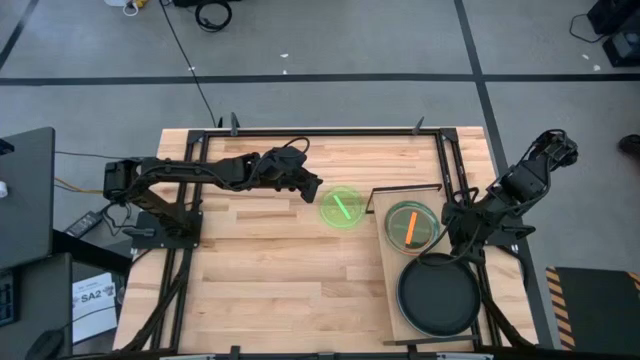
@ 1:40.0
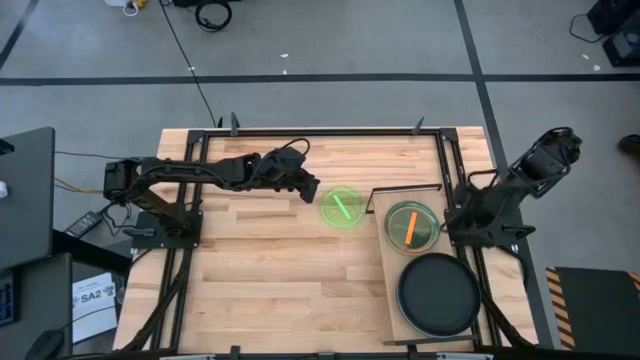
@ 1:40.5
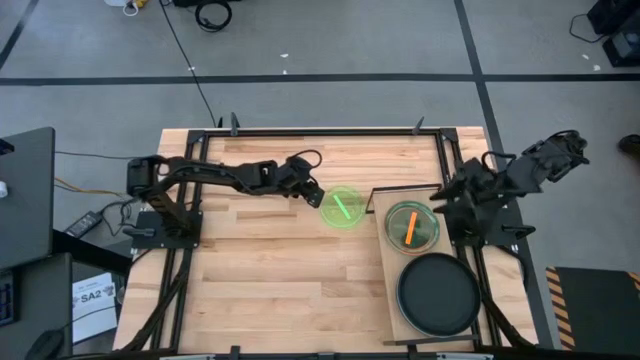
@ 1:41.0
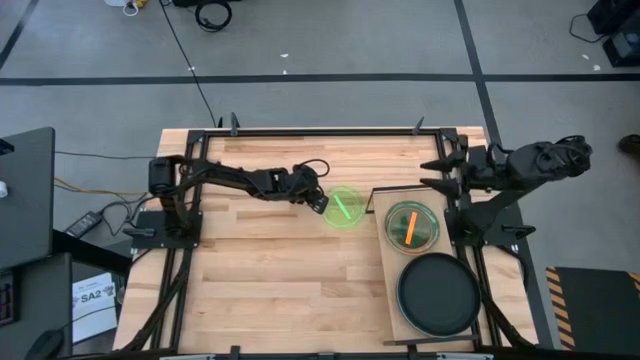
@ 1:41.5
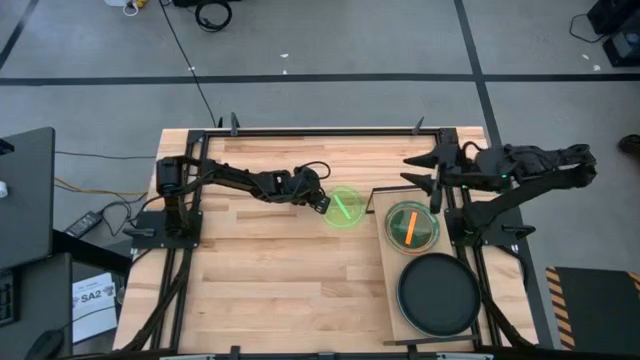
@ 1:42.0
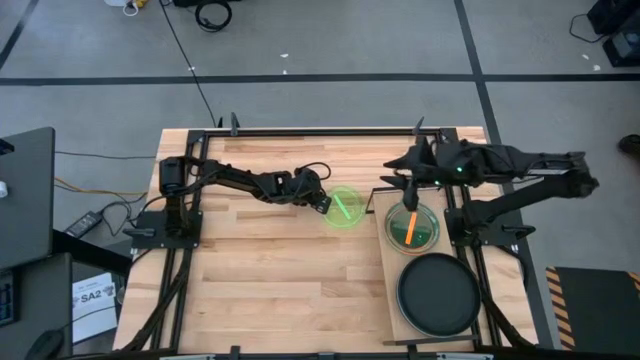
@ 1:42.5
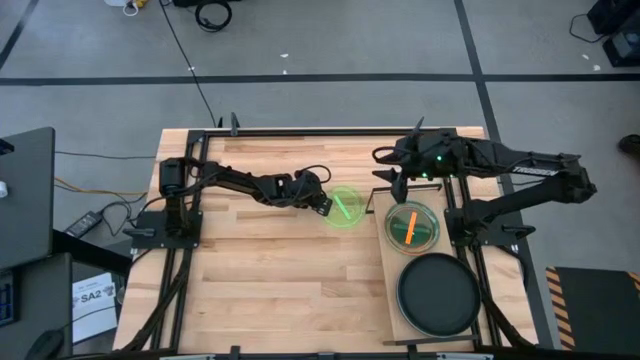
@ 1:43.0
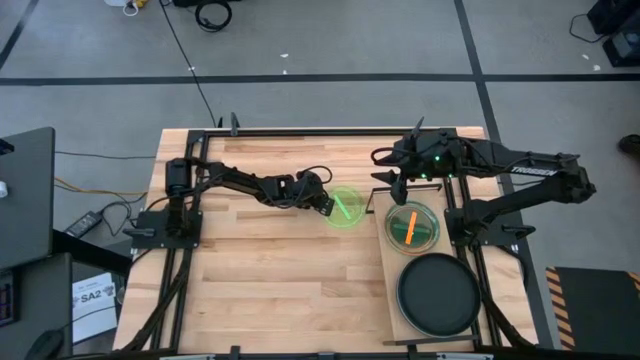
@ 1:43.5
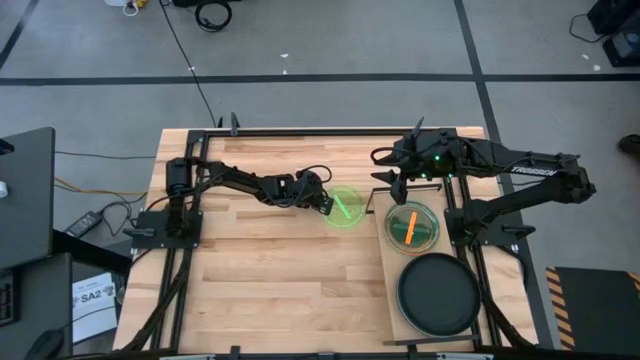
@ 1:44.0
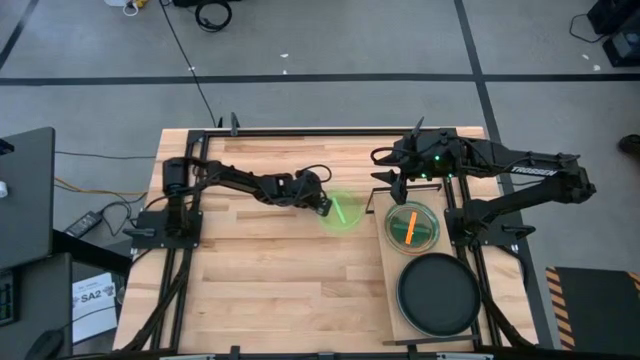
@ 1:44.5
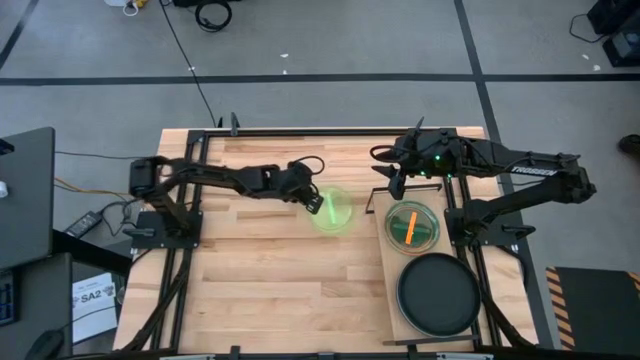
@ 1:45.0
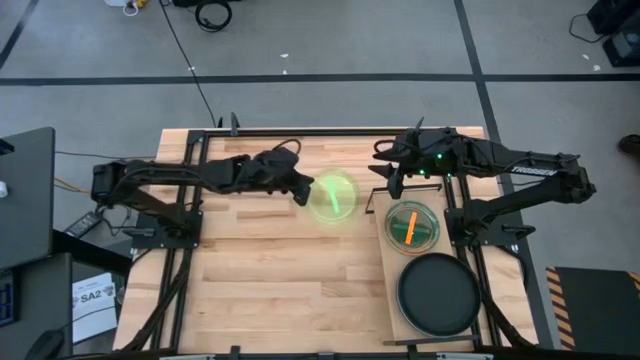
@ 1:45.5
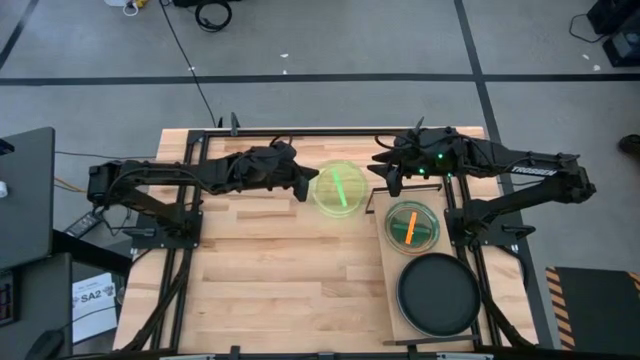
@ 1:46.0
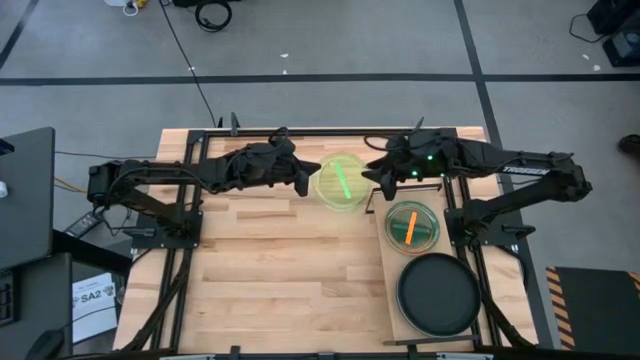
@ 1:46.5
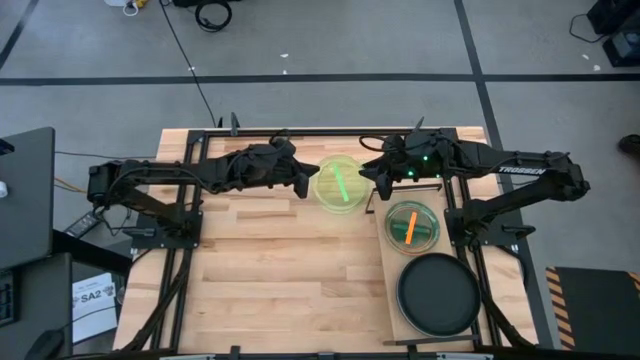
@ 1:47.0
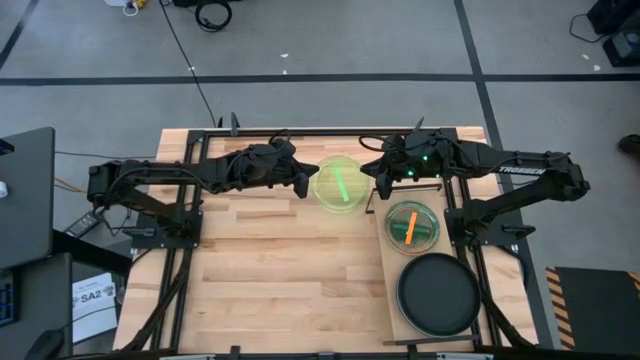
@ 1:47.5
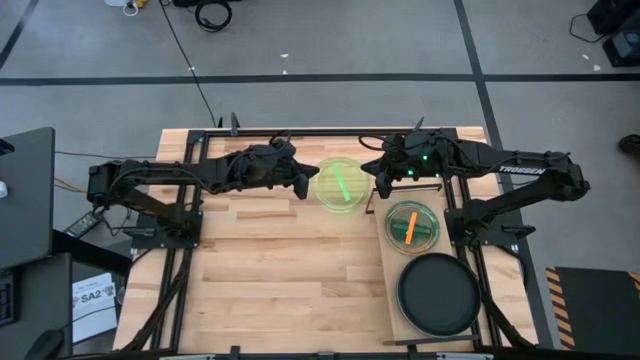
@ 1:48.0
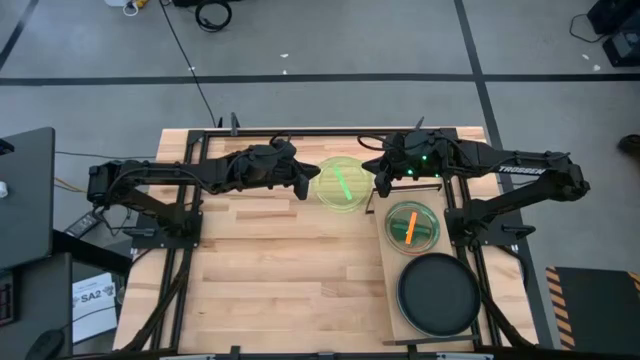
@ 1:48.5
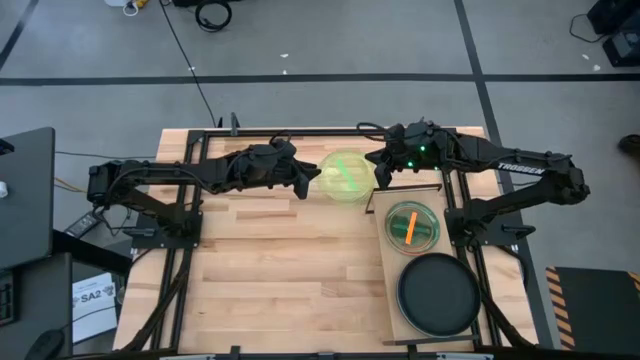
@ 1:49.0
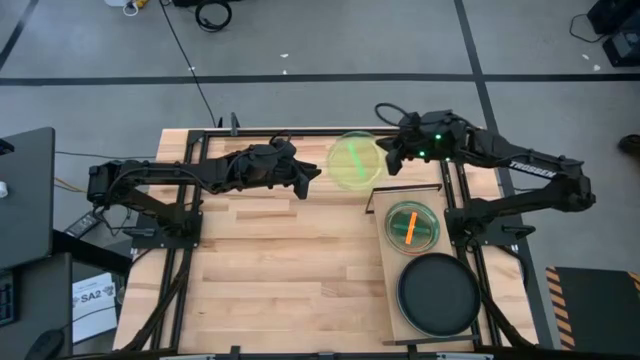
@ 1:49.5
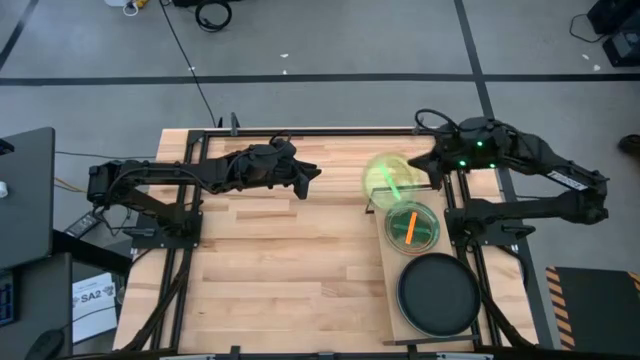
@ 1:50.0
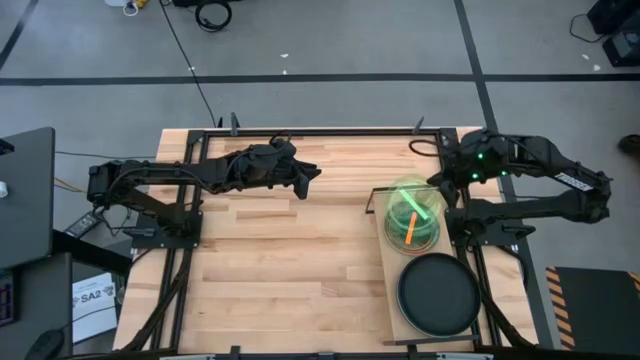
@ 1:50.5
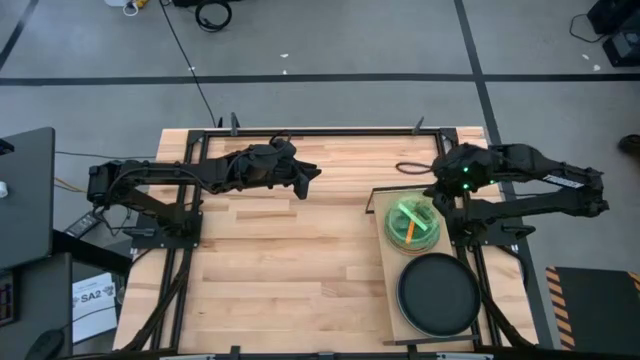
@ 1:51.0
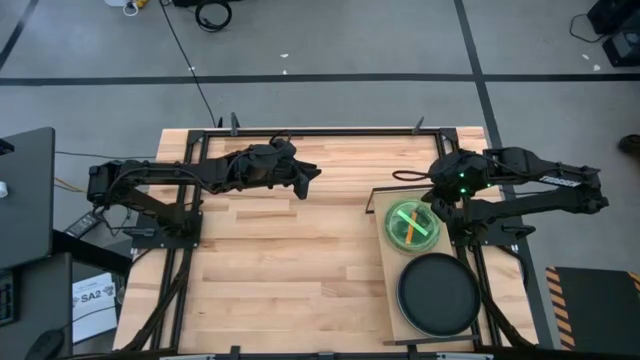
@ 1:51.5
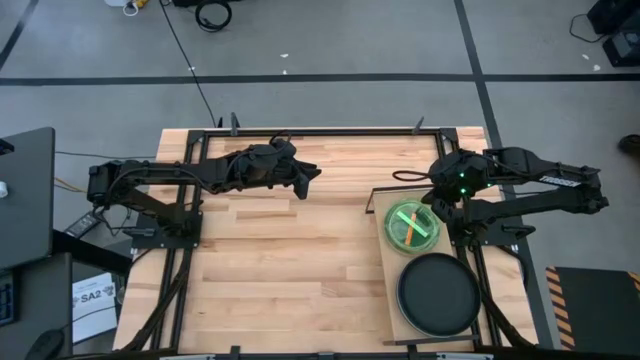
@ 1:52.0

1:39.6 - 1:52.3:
Task: Place and stack plates onto a shelf
Stack the green plate on top of the orange plate on the shelf

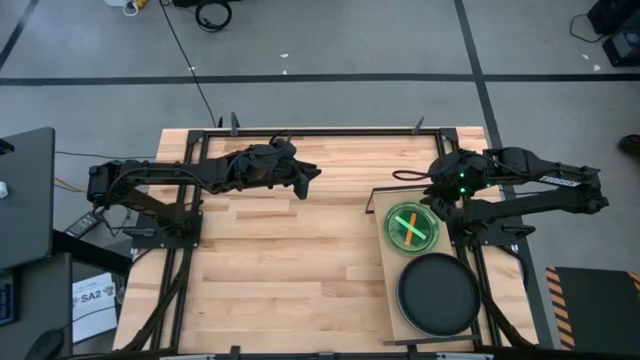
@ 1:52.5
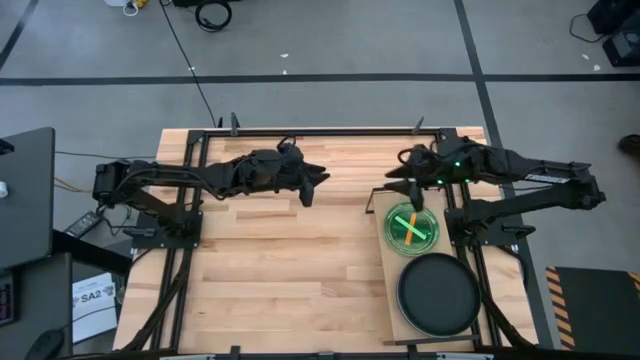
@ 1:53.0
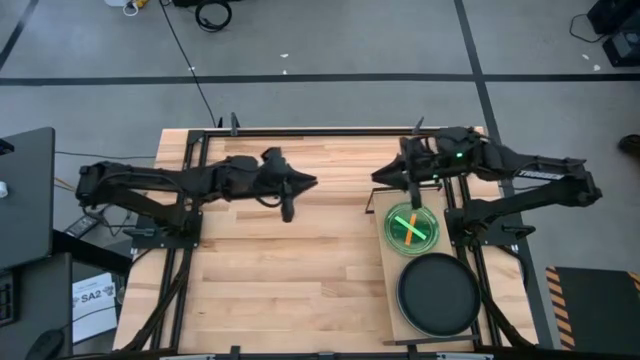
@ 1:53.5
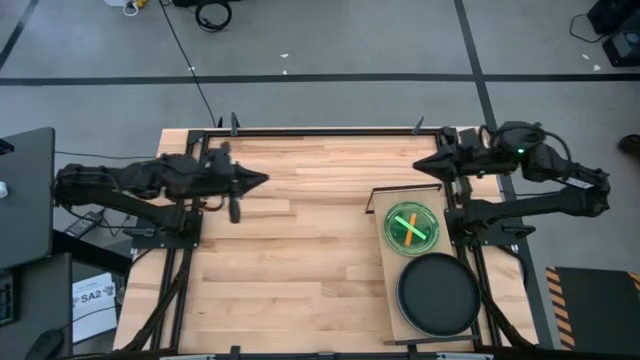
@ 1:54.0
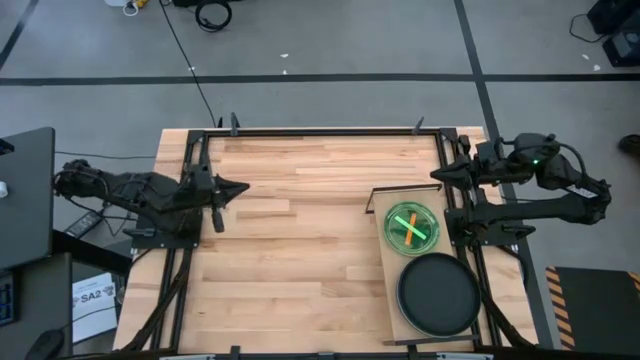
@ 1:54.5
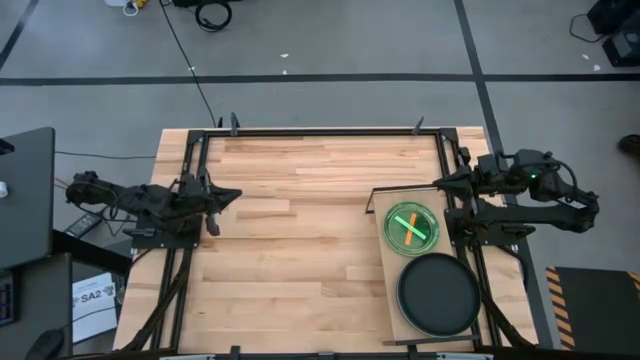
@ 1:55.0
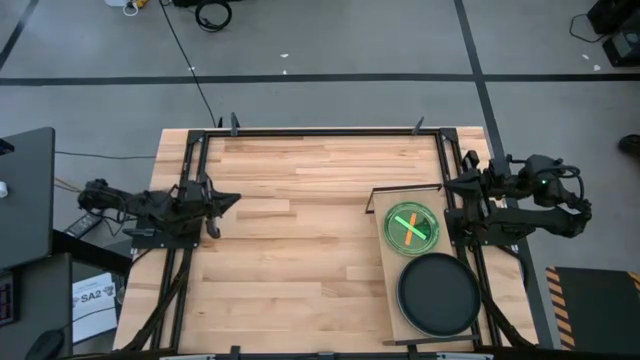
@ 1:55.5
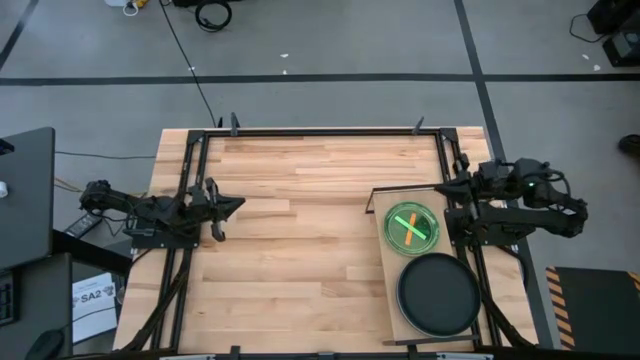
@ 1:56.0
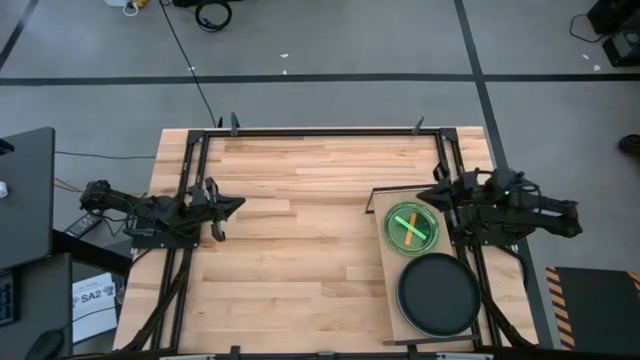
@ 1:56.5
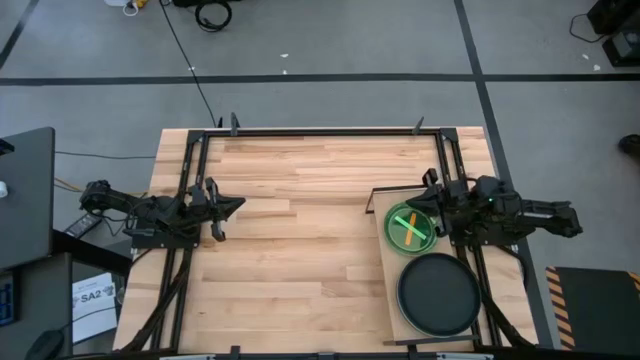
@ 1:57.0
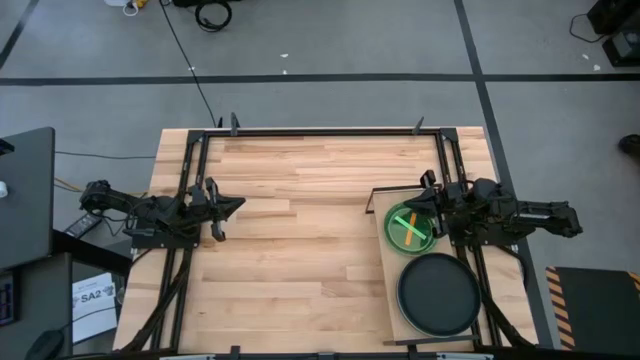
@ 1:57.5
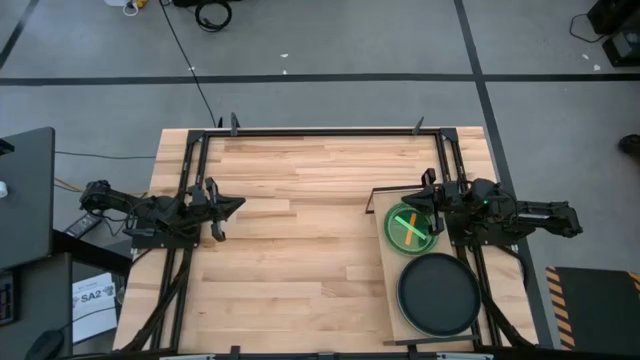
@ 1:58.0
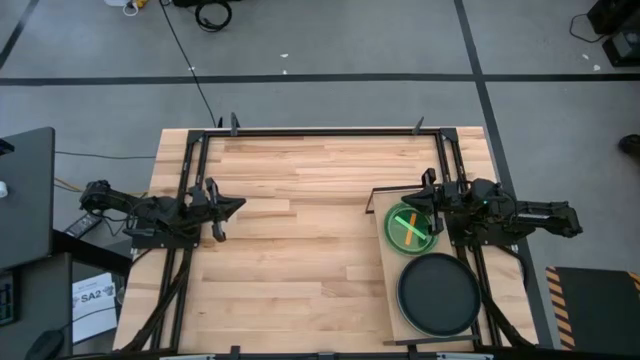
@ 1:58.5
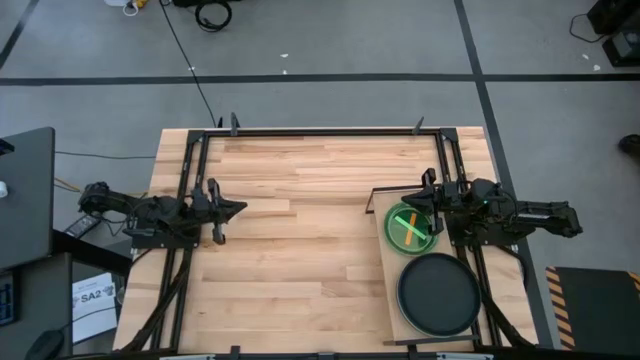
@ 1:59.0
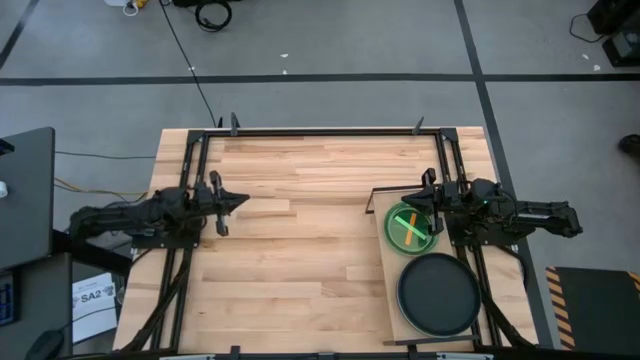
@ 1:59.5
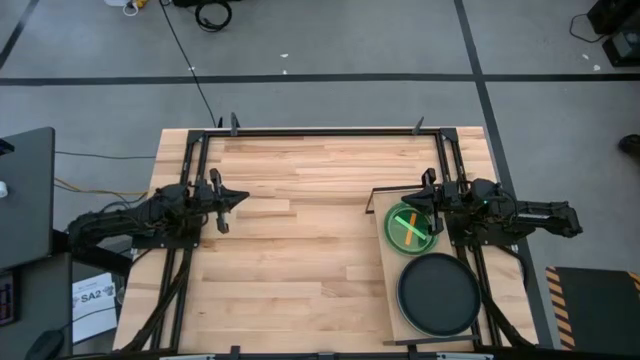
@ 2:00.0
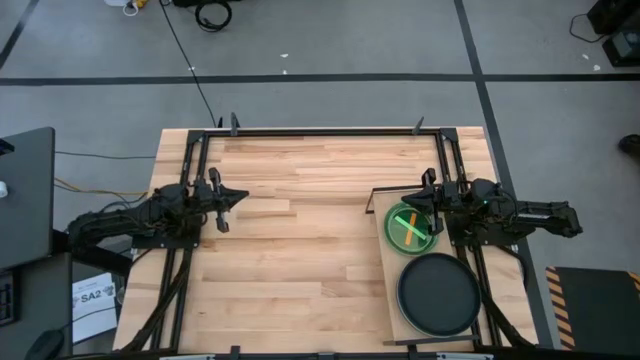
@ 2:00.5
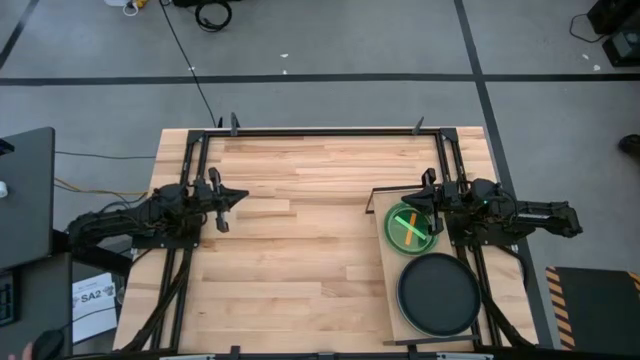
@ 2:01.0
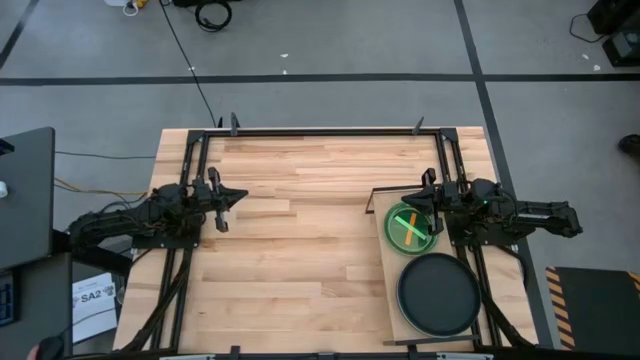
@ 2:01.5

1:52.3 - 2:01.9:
Return to Home Position
